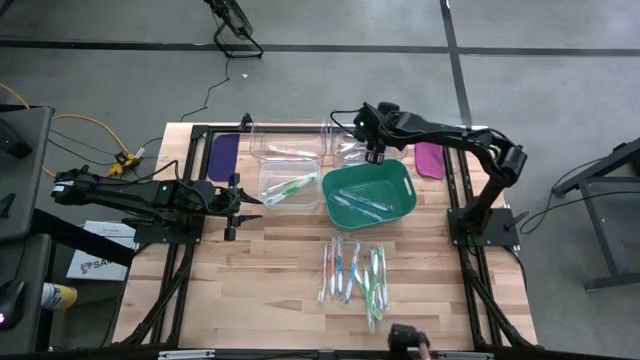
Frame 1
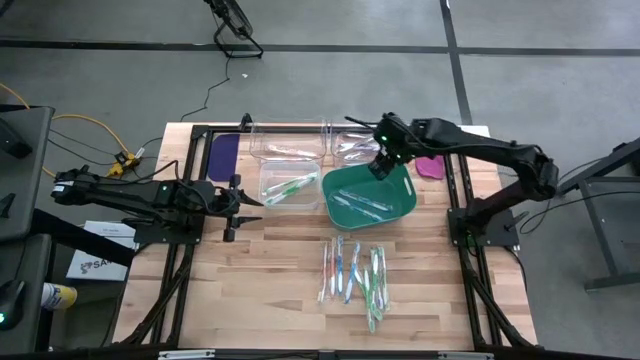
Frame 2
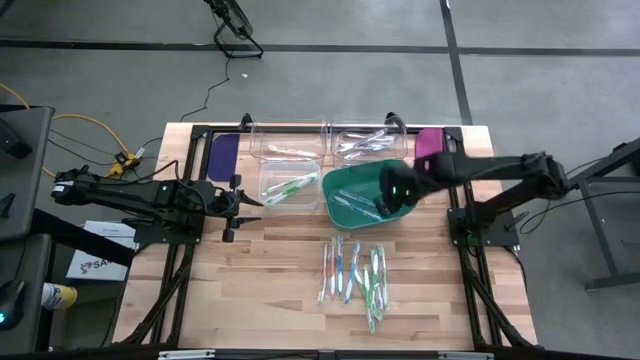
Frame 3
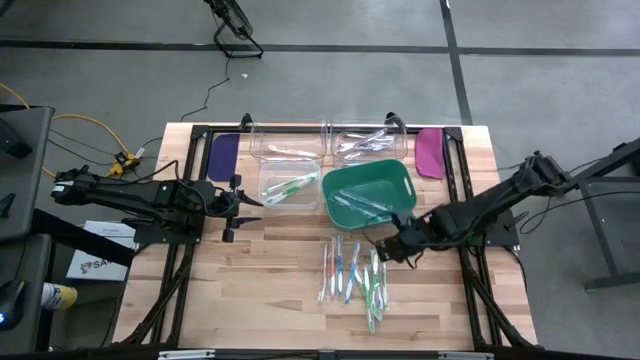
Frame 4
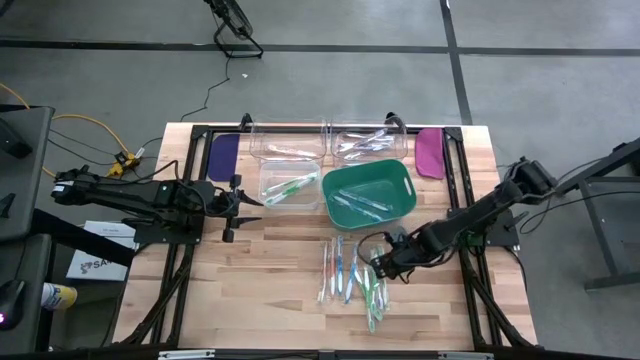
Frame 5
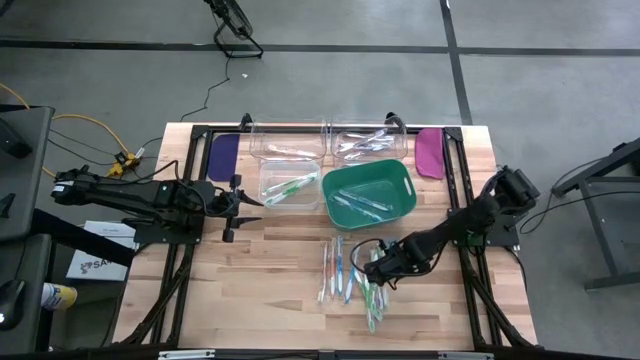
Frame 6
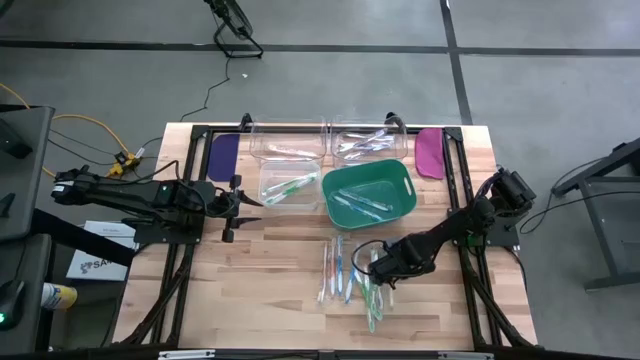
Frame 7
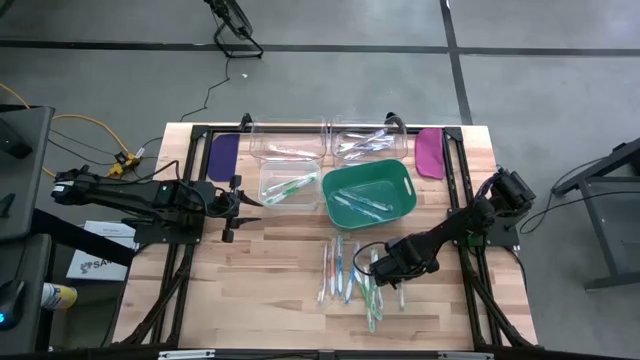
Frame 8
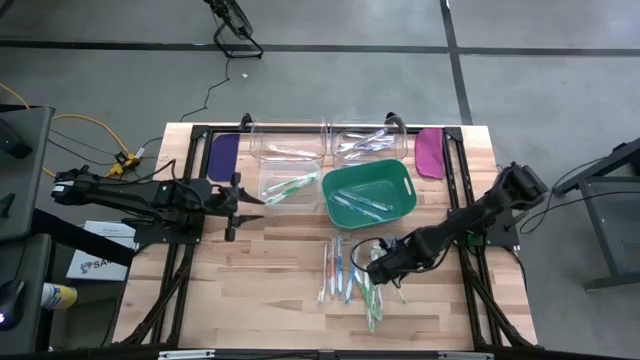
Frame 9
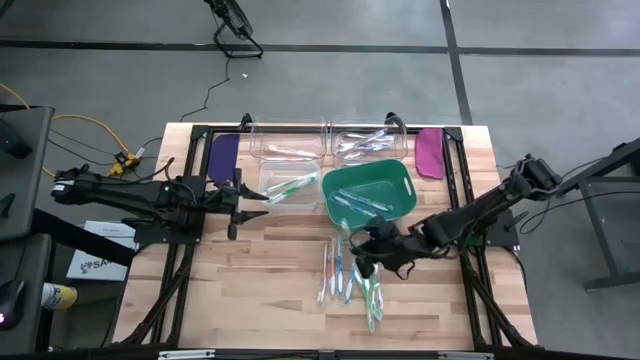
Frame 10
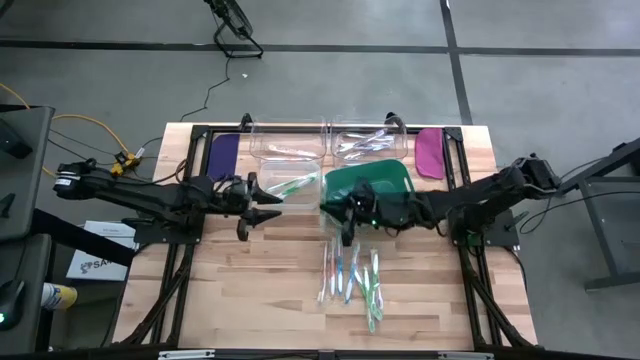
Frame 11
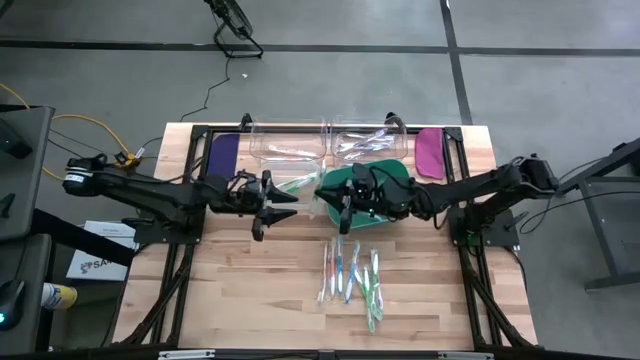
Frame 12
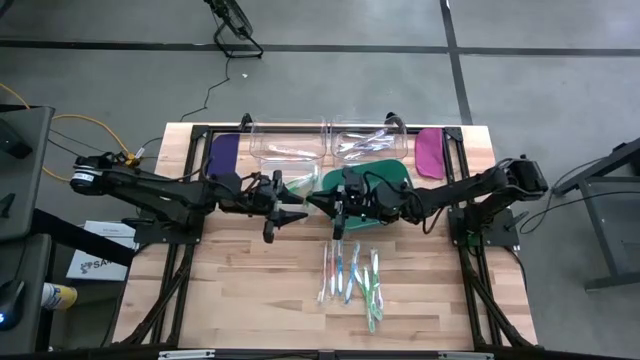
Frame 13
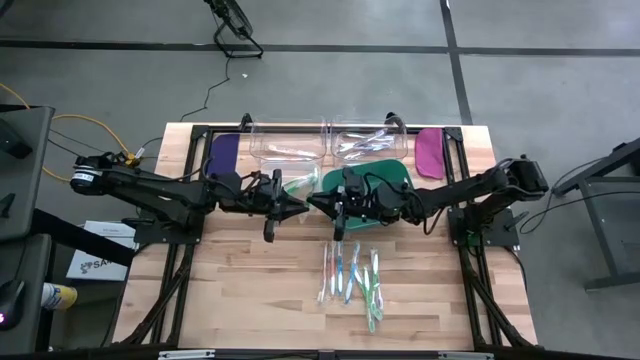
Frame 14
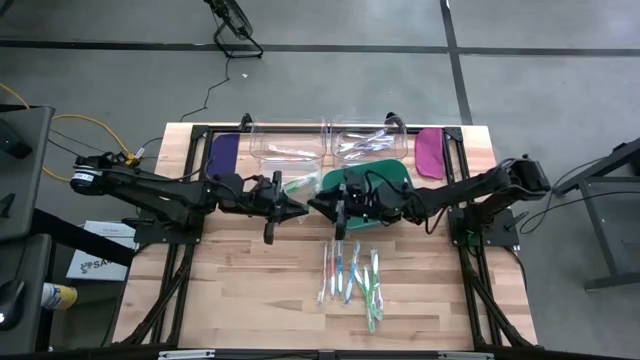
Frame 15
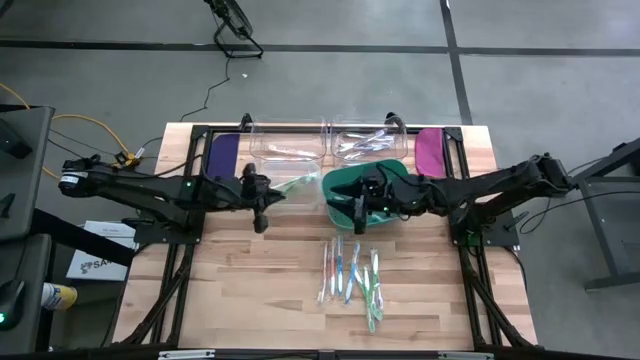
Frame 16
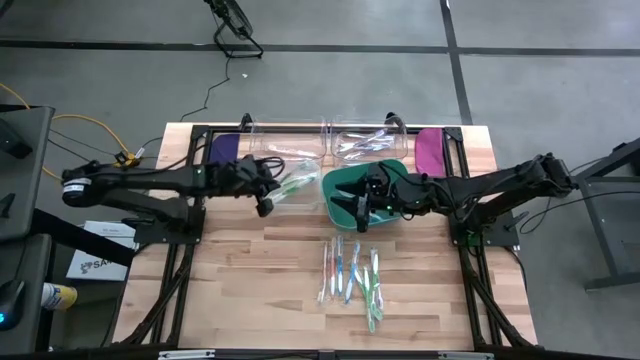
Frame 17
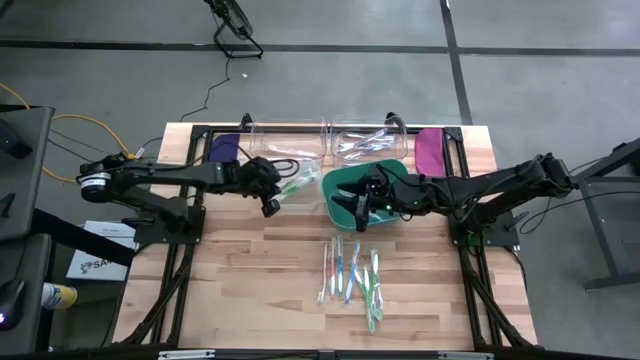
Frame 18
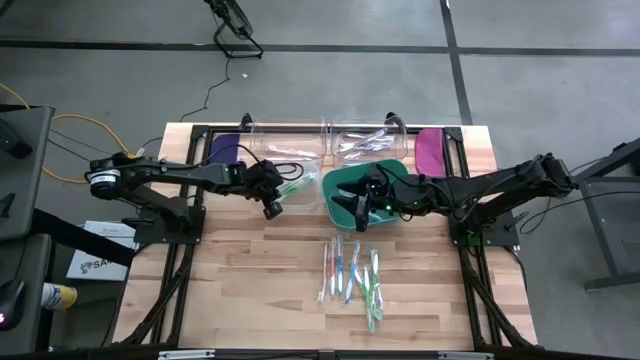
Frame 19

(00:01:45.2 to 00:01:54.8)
Task: Pick & Place Toothbrushes
Put the green toothbrush into the white bin

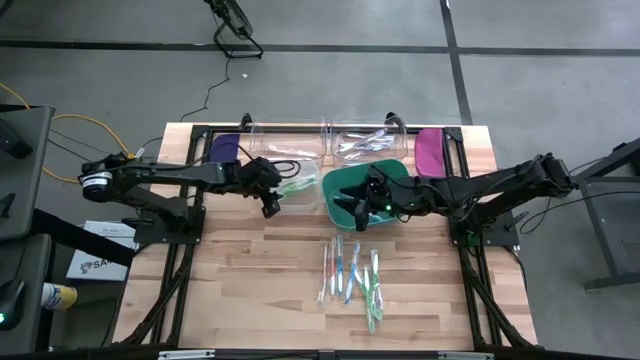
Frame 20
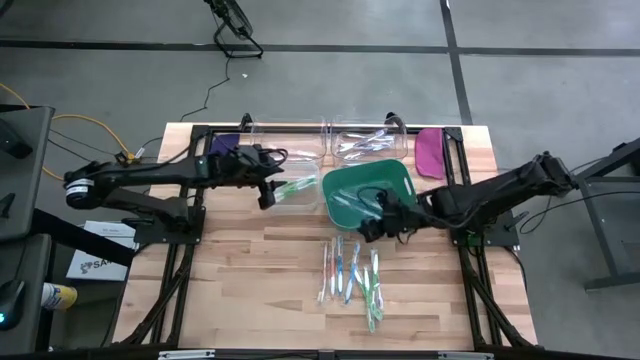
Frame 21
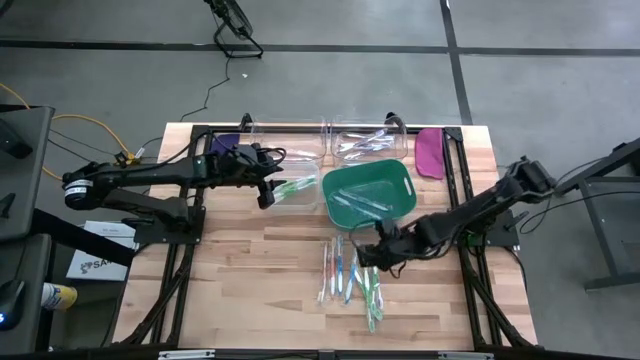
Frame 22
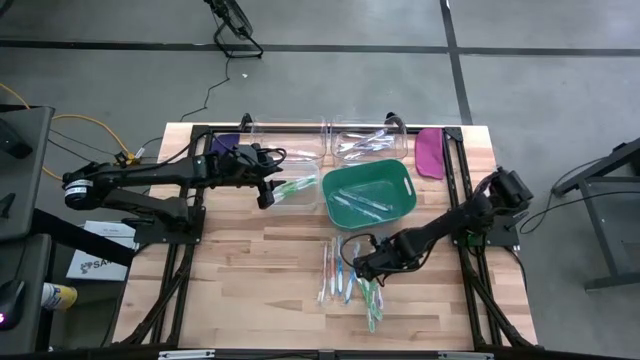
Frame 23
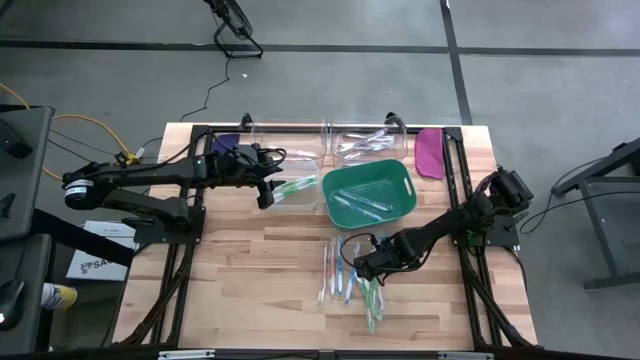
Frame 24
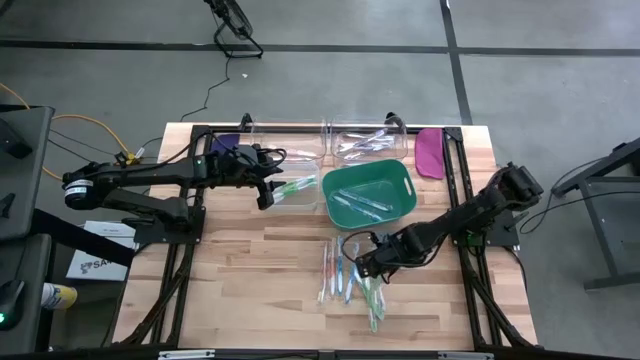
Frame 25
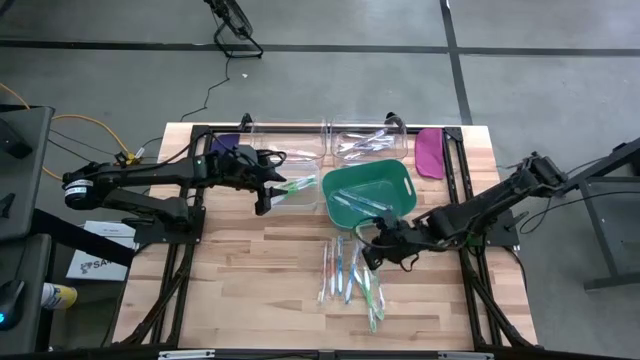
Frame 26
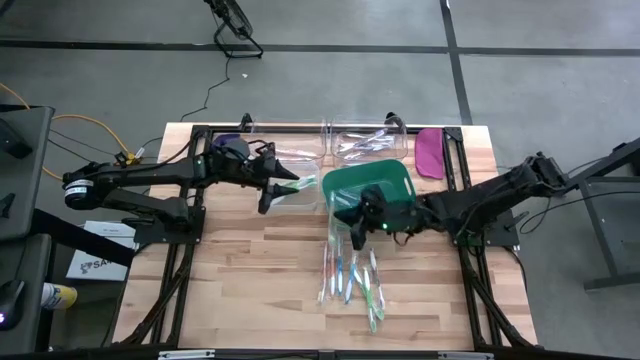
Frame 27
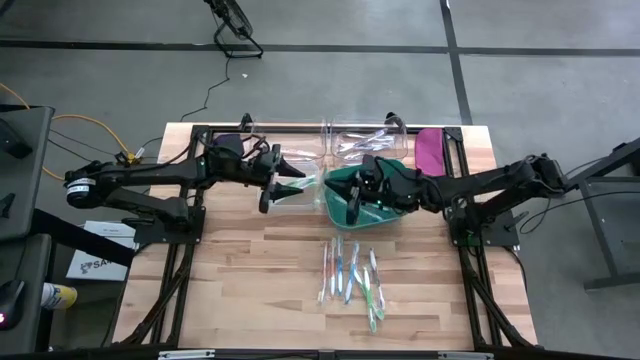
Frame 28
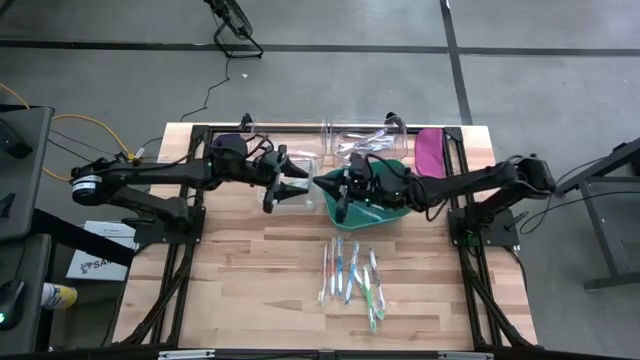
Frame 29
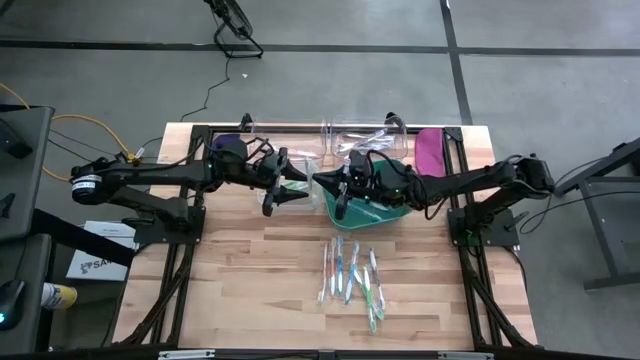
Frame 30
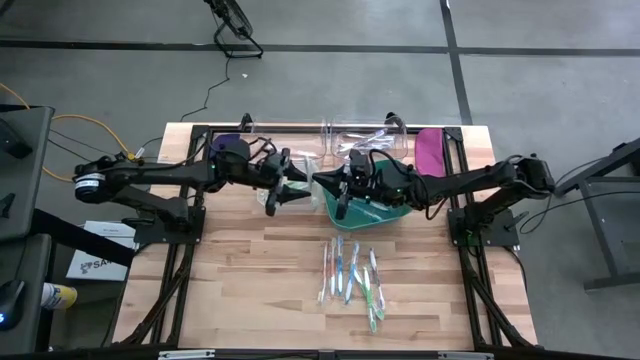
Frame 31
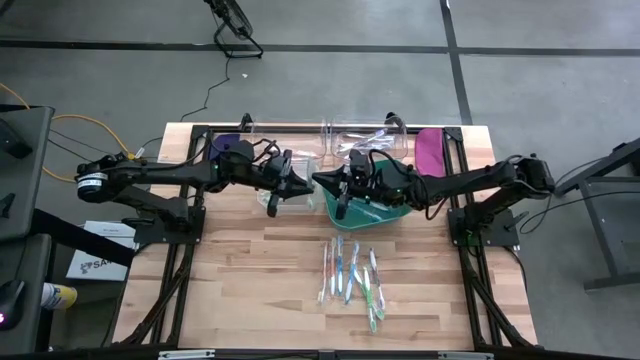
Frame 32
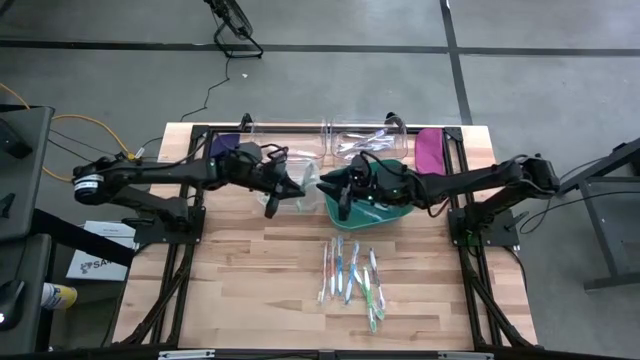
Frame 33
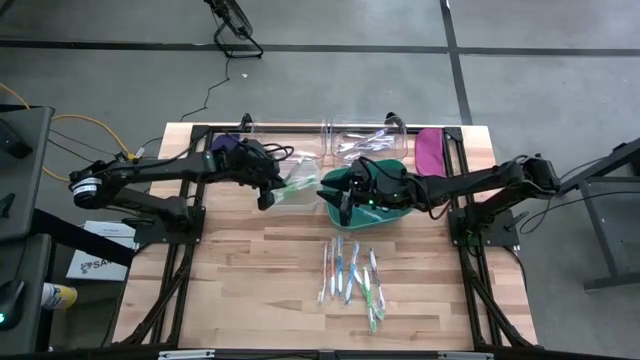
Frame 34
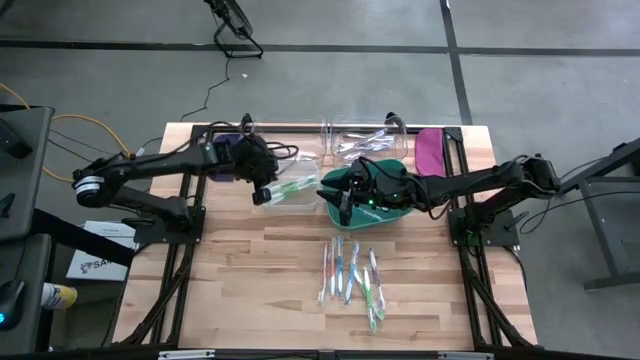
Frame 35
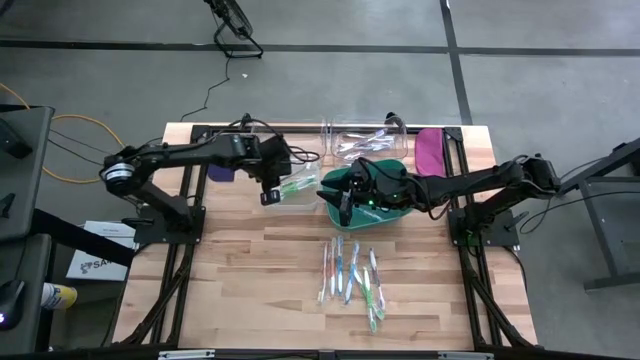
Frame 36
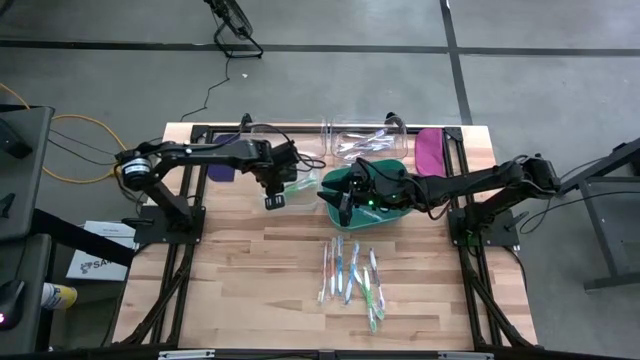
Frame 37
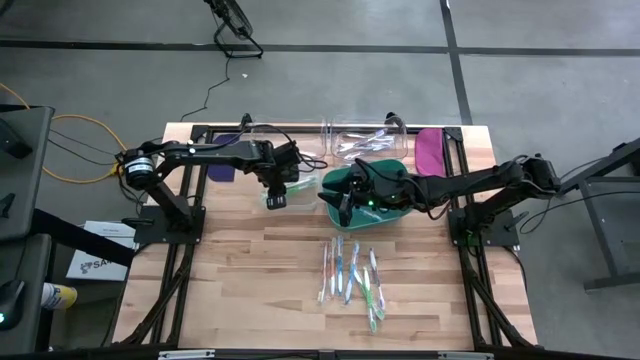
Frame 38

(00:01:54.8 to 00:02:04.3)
Put the green toothbrush into the white bin

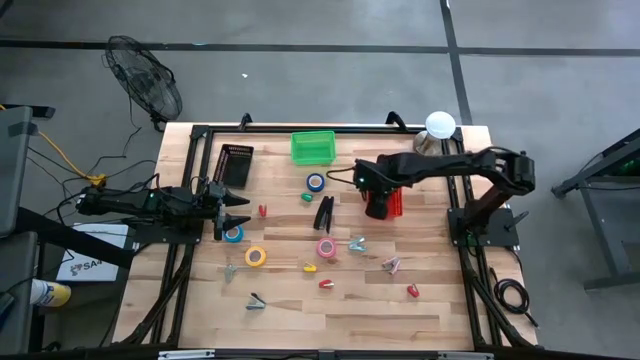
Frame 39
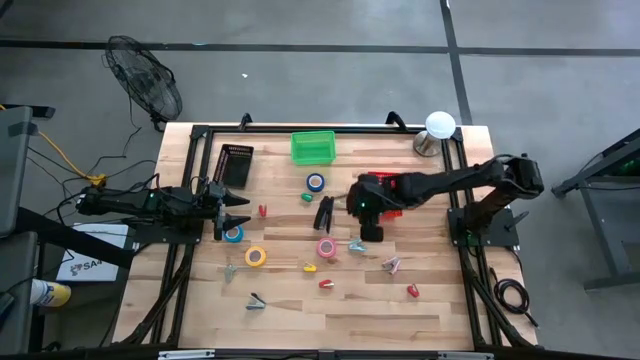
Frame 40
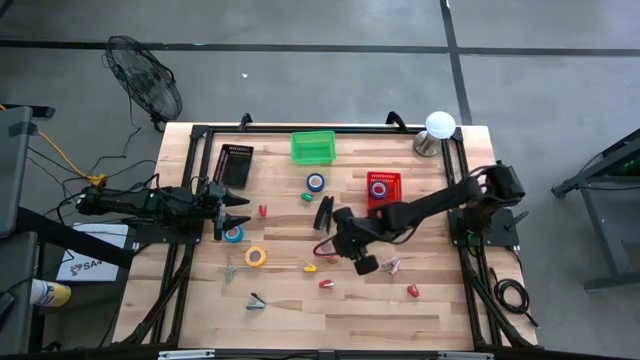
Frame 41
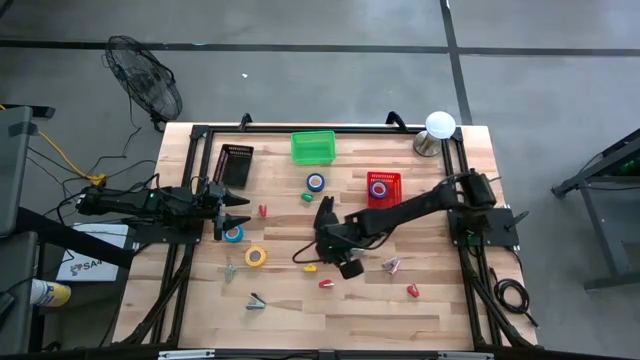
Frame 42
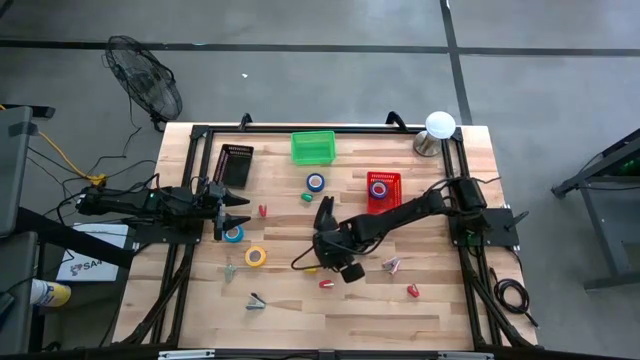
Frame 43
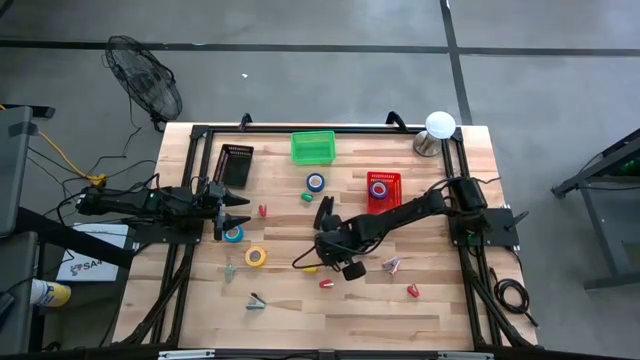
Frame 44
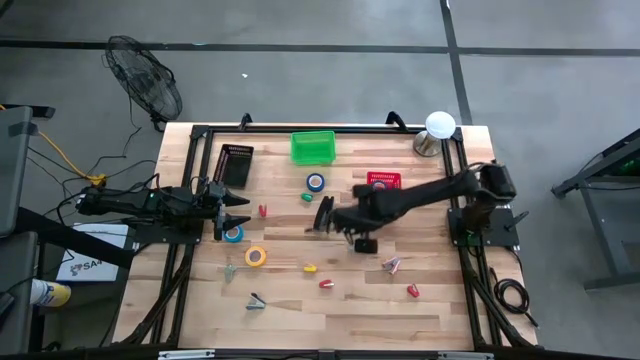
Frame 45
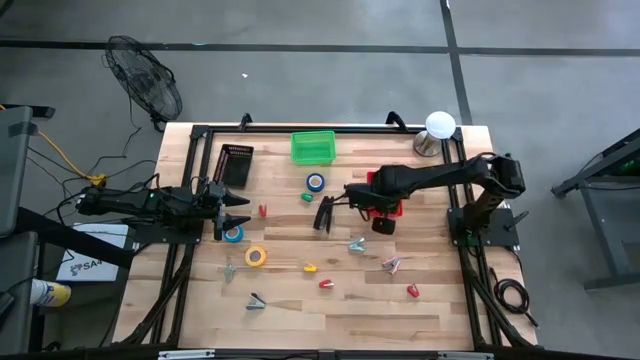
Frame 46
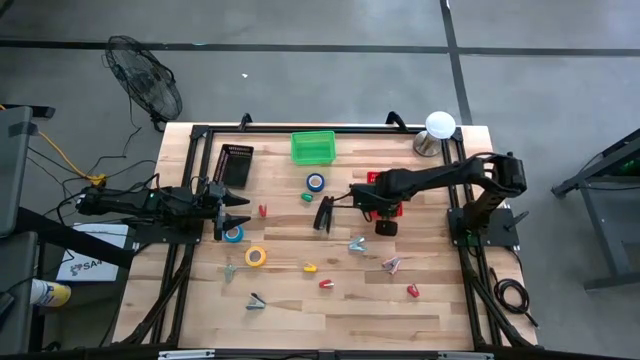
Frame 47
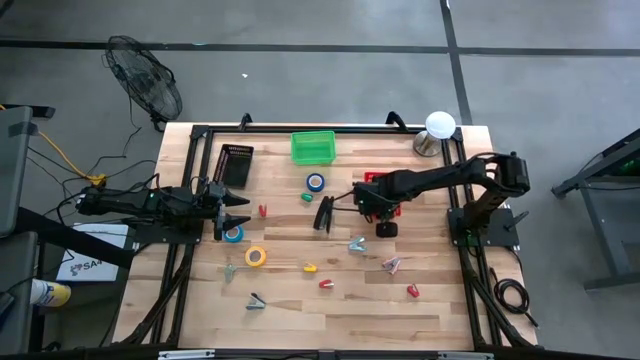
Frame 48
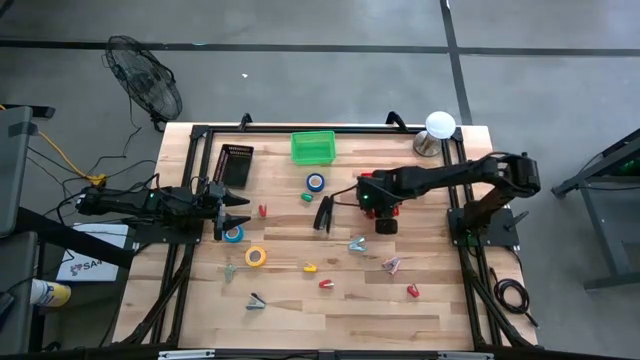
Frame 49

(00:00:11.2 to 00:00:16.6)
Task: Pick and place Stapler, Stapler remover, tape
Put the pink tape into the red bin
